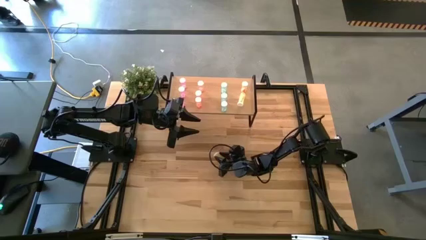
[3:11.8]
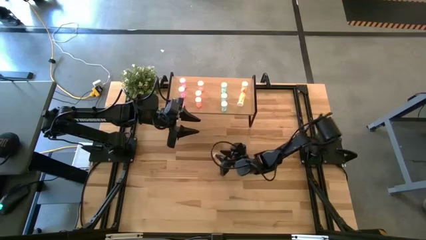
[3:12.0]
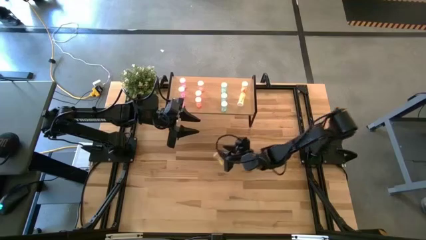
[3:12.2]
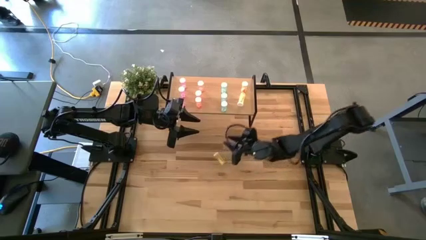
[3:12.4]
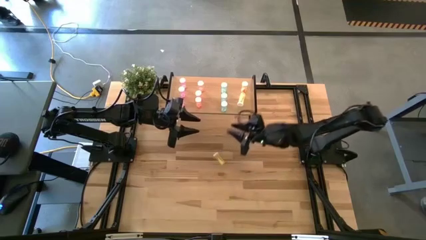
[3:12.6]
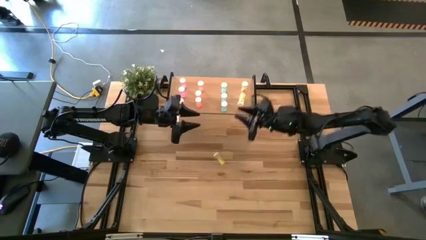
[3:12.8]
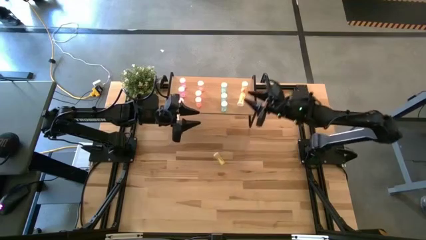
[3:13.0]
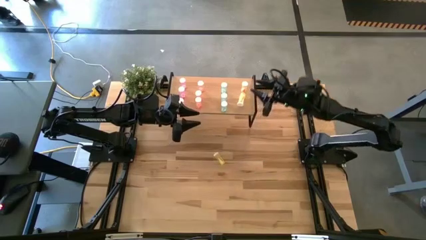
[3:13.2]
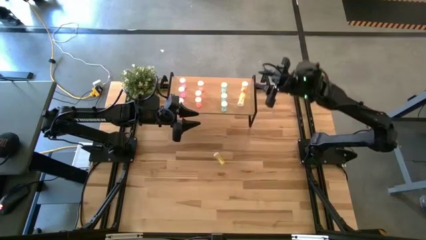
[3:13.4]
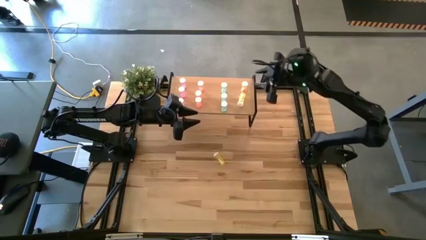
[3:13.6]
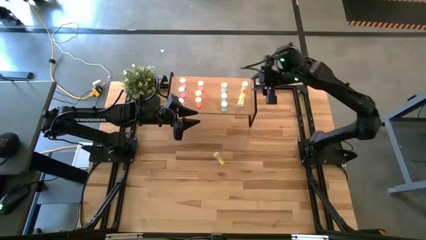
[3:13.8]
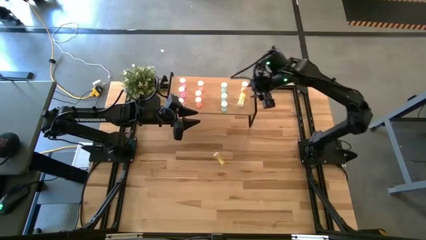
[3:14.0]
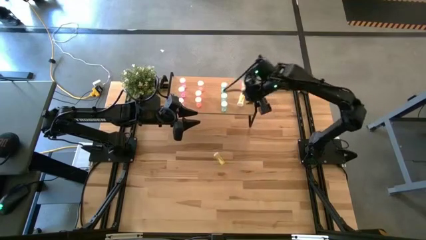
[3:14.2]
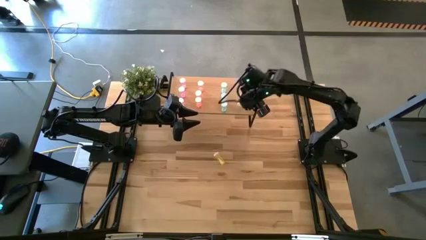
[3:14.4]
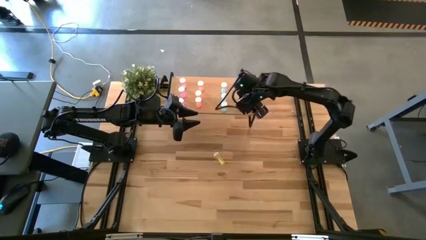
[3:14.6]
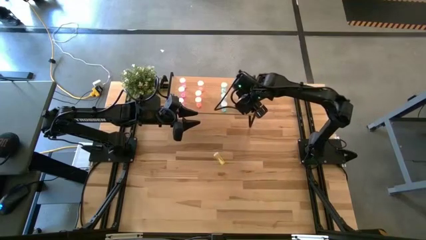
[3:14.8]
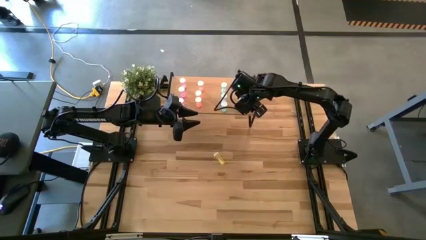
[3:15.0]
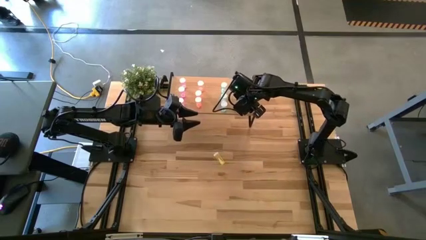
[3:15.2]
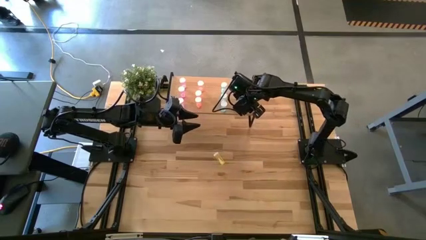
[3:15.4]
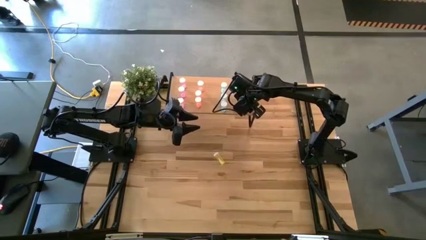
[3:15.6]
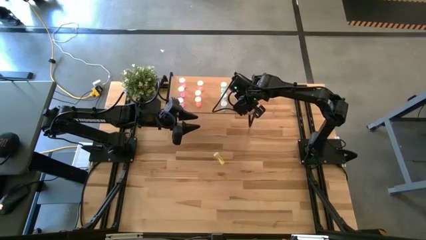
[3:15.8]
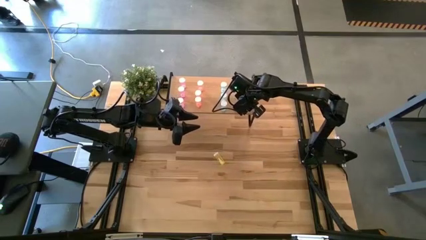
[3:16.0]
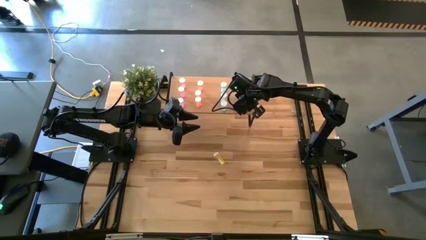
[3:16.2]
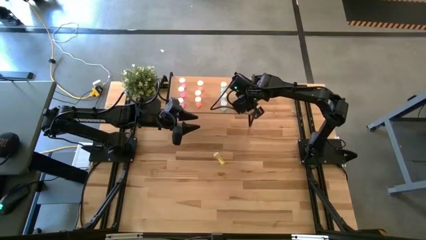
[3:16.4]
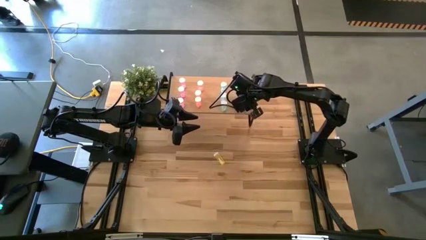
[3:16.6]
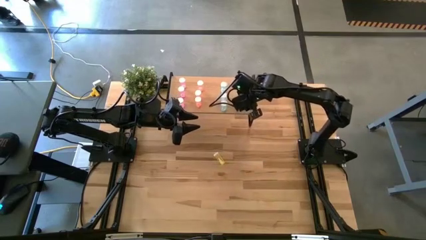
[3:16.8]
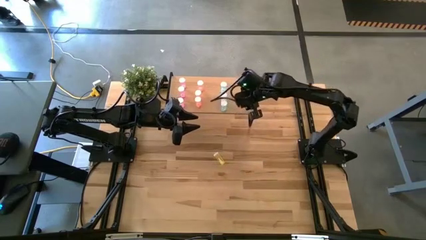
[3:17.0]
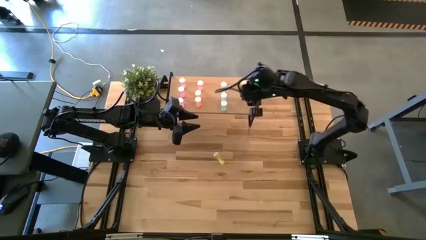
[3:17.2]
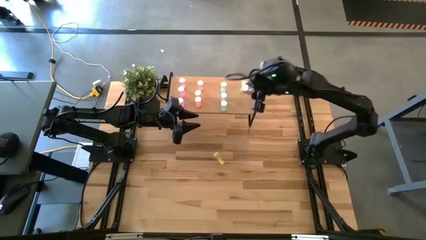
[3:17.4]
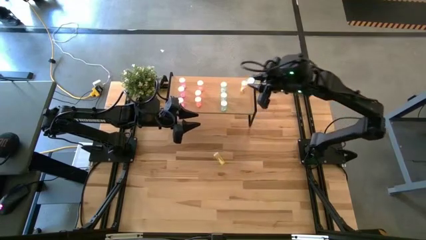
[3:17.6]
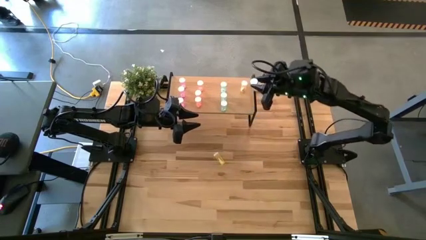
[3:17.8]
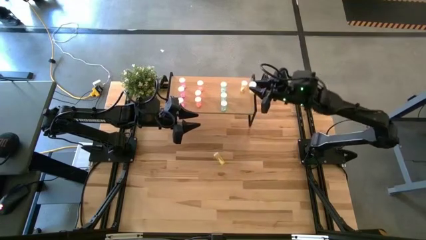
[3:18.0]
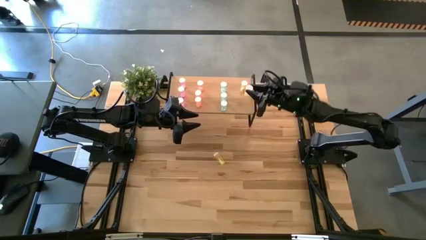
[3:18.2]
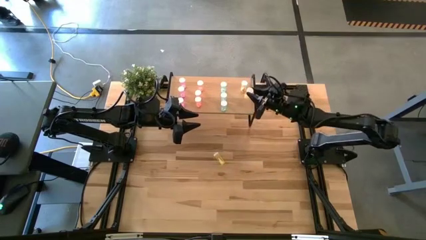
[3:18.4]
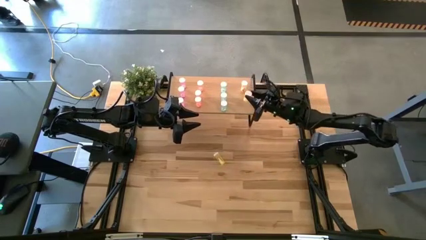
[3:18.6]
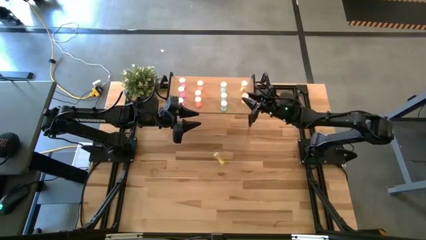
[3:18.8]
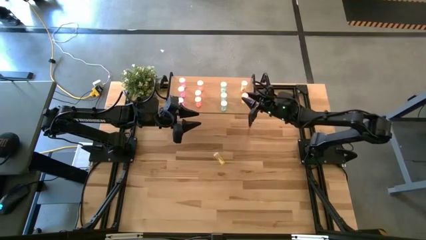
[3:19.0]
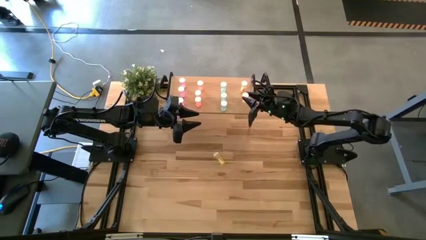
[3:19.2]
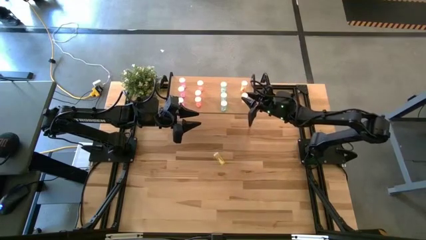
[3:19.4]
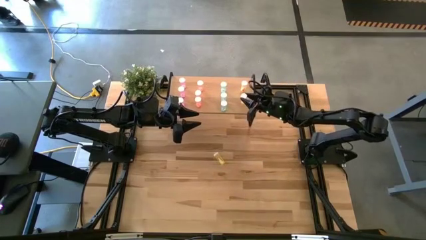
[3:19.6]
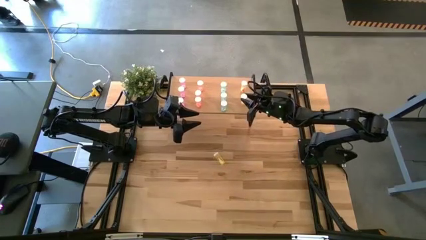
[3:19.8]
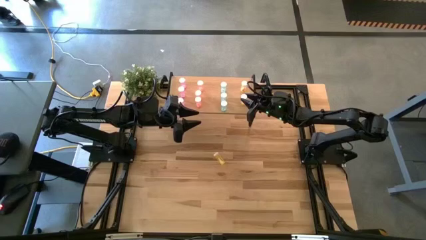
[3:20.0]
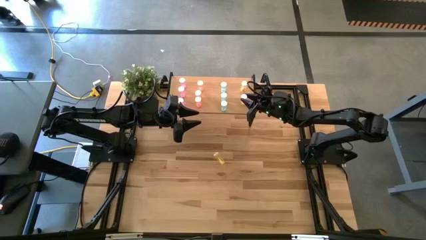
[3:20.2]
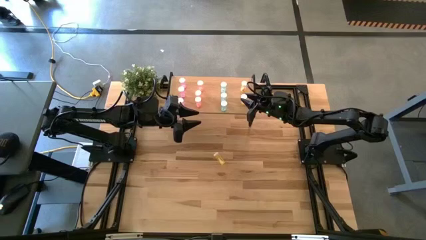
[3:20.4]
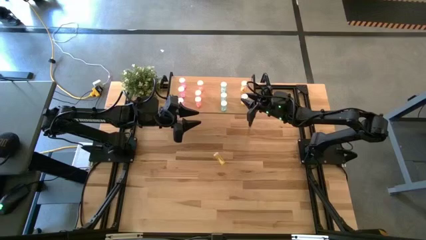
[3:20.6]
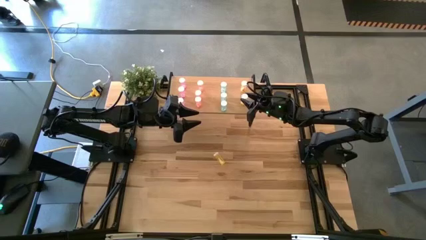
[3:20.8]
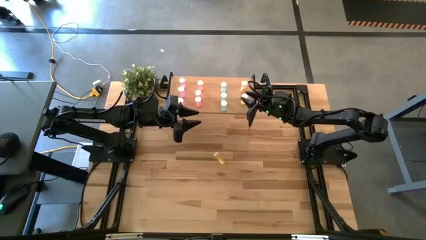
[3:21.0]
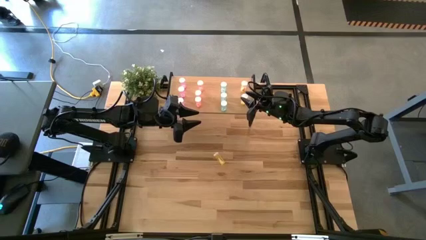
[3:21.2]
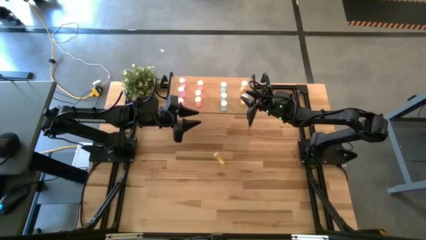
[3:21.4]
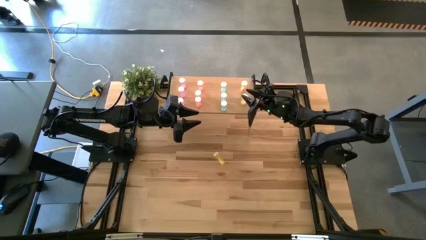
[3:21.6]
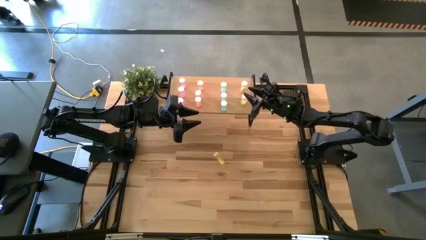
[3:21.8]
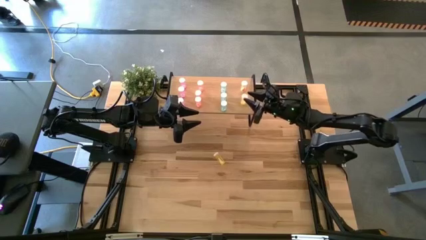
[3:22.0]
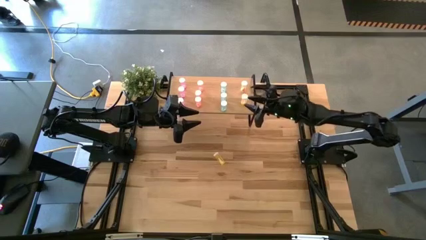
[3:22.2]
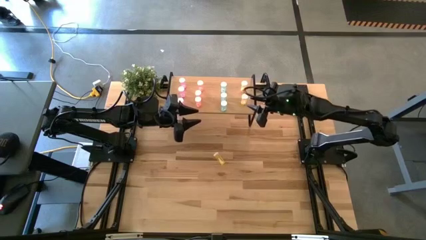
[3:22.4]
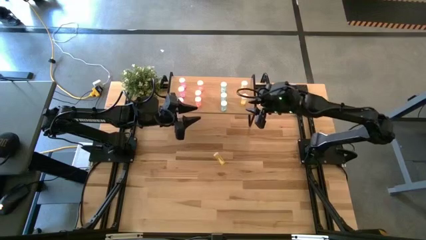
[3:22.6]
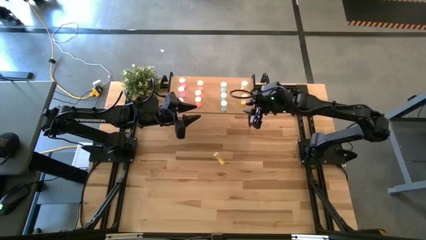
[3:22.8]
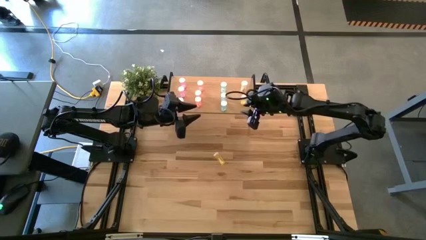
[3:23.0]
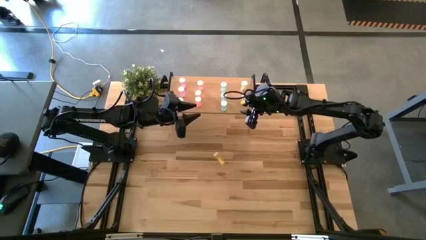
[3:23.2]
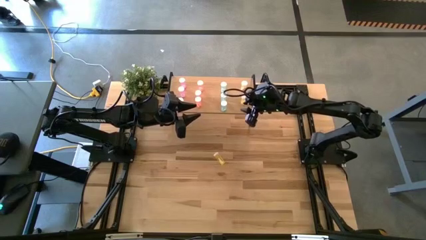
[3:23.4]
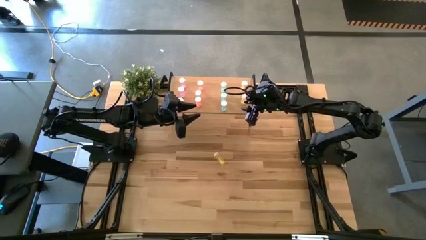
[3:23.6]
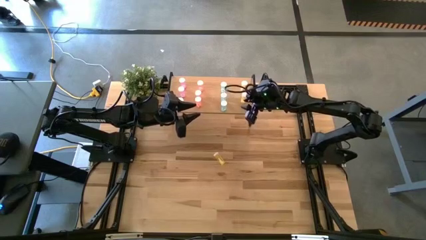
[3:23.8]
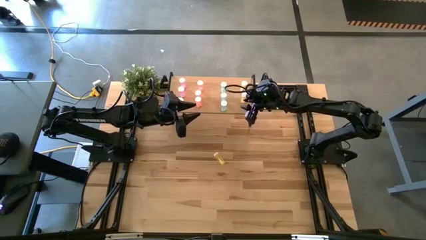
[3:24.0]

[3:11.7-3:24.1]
Task: Pick and place medicine bottles onto shelf by color
Adjust the yellow pill bottle on the shelf
